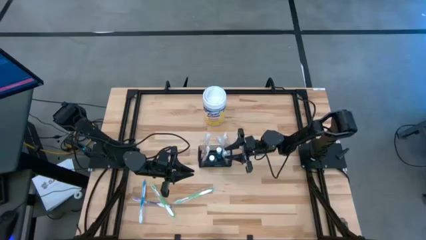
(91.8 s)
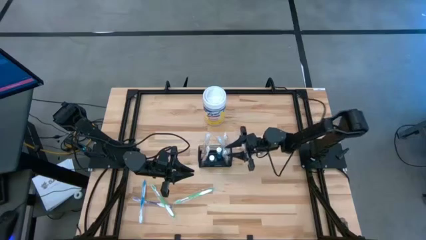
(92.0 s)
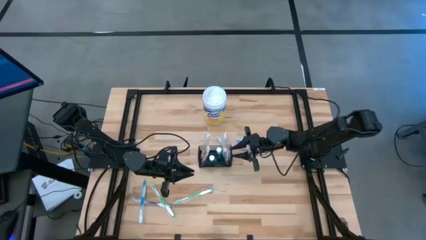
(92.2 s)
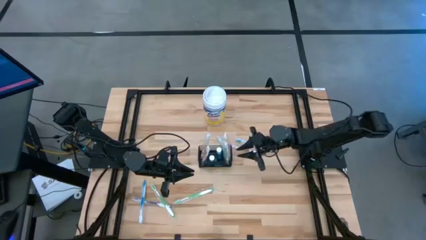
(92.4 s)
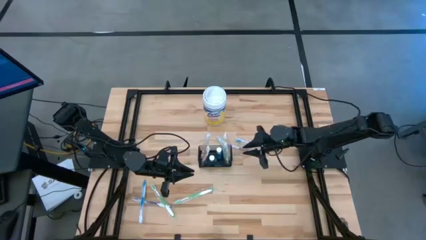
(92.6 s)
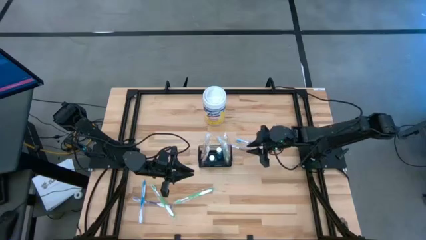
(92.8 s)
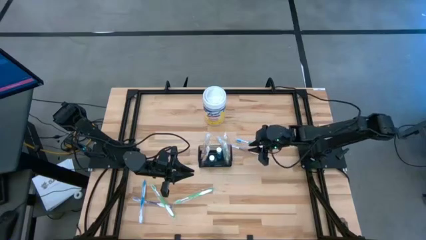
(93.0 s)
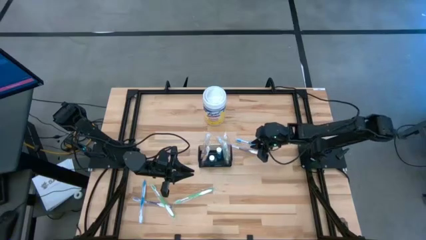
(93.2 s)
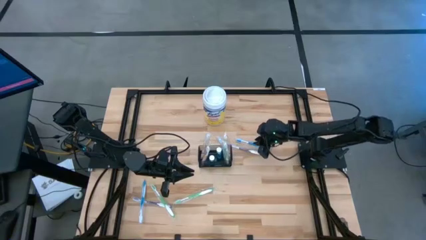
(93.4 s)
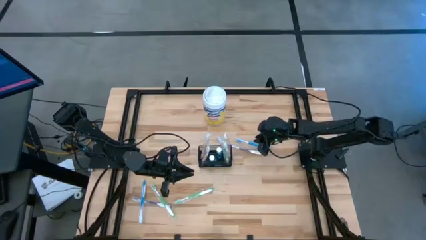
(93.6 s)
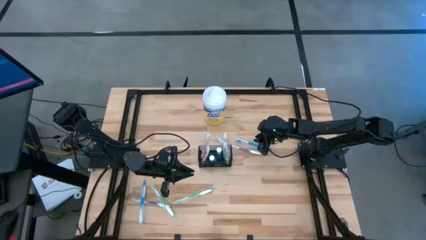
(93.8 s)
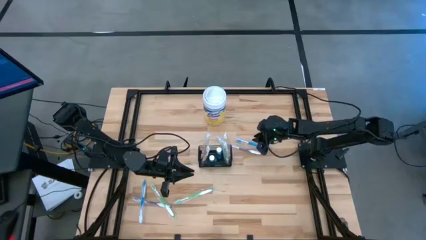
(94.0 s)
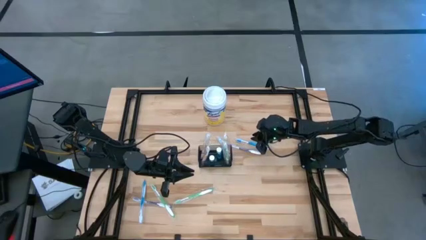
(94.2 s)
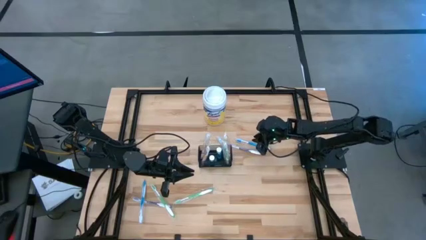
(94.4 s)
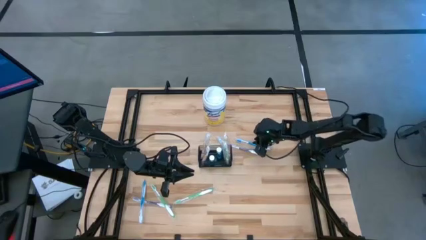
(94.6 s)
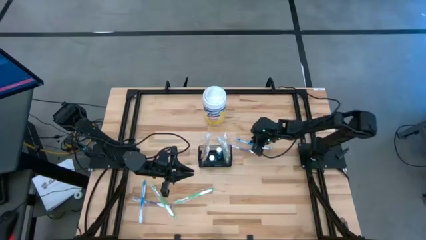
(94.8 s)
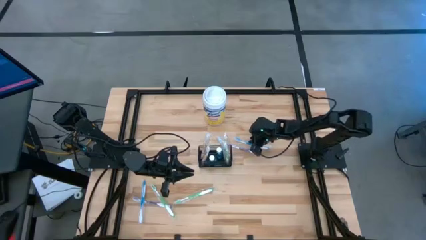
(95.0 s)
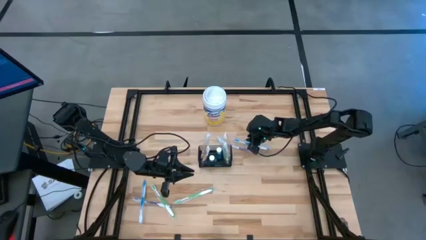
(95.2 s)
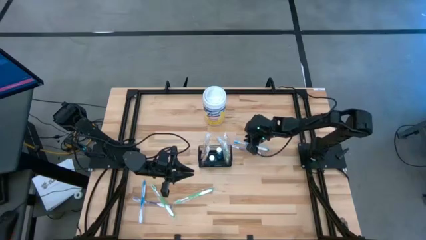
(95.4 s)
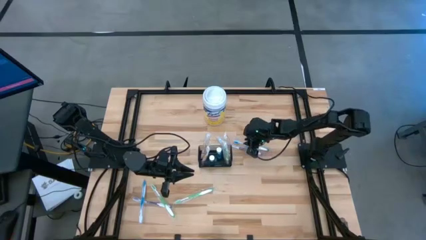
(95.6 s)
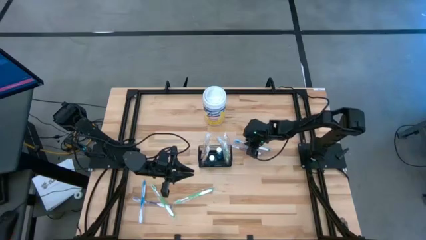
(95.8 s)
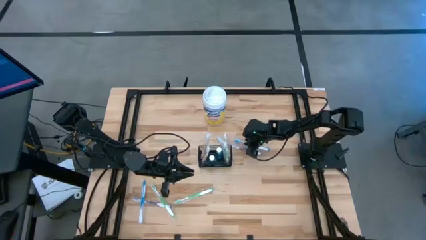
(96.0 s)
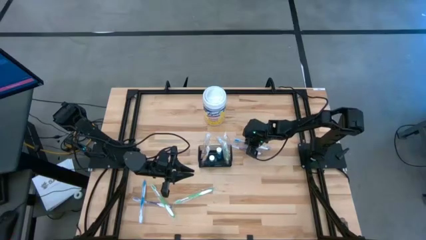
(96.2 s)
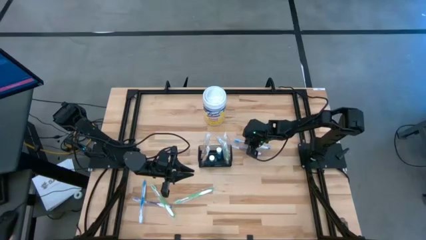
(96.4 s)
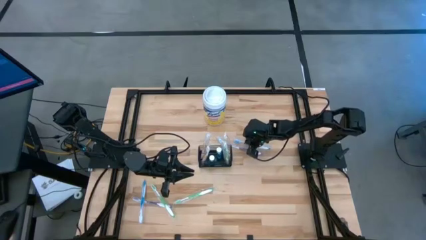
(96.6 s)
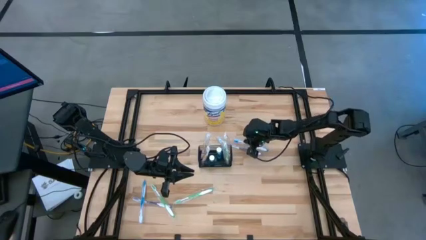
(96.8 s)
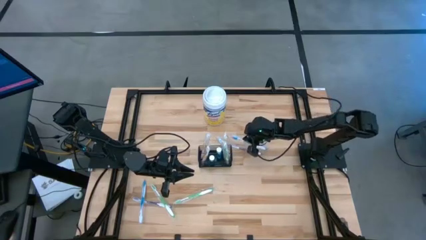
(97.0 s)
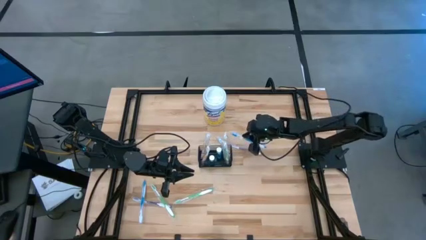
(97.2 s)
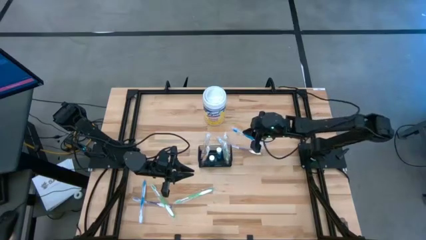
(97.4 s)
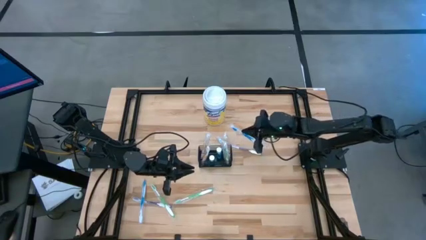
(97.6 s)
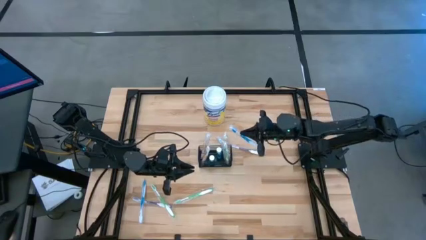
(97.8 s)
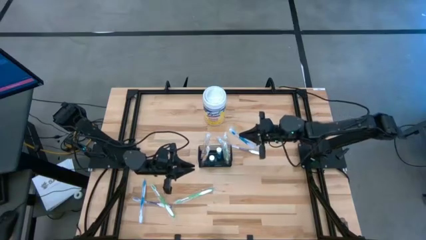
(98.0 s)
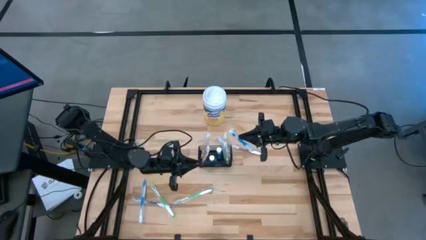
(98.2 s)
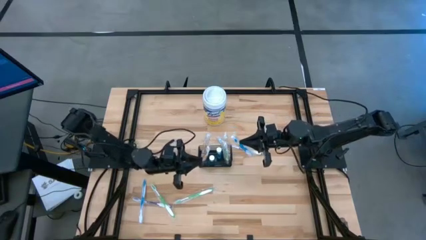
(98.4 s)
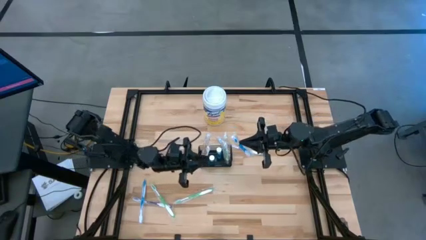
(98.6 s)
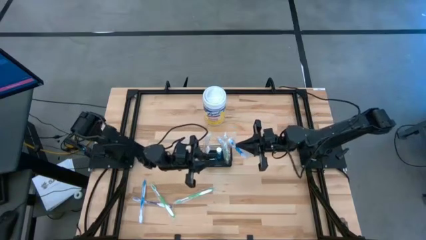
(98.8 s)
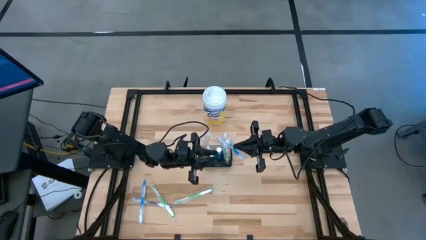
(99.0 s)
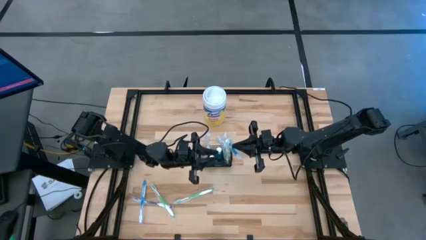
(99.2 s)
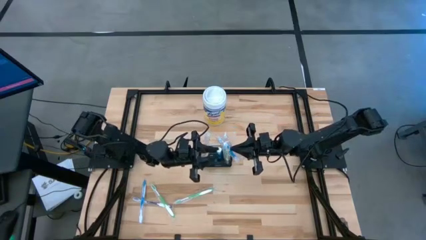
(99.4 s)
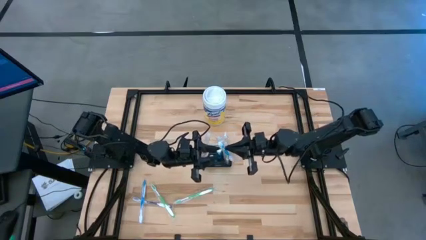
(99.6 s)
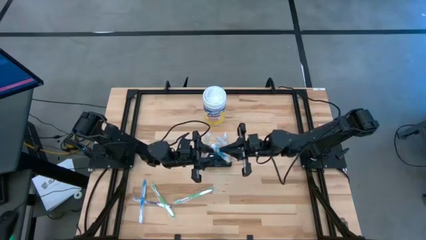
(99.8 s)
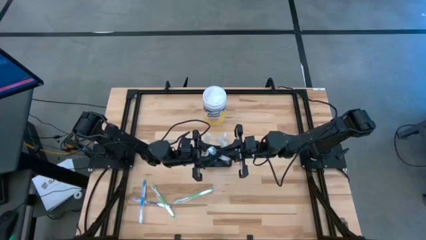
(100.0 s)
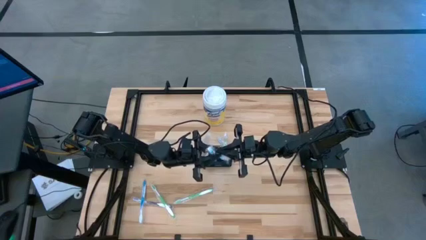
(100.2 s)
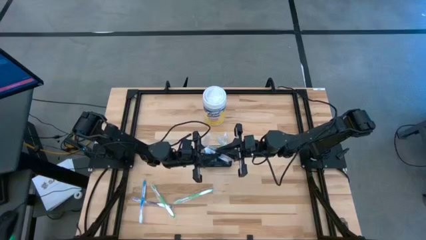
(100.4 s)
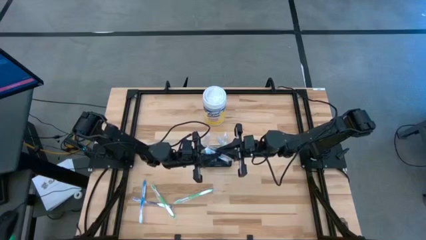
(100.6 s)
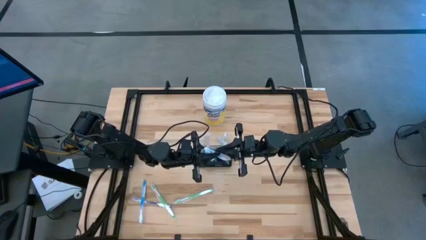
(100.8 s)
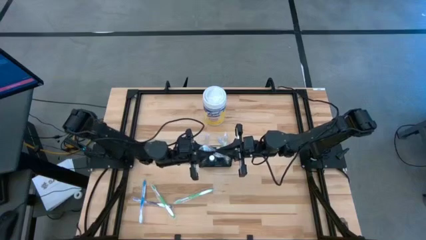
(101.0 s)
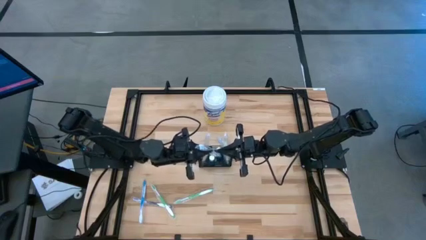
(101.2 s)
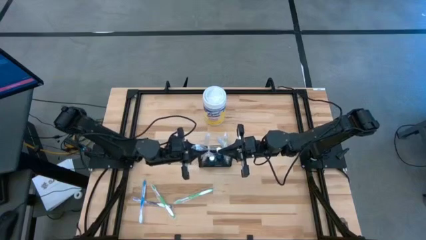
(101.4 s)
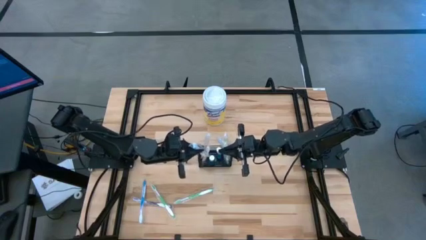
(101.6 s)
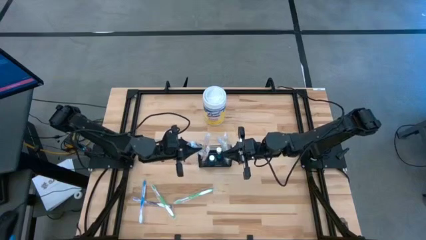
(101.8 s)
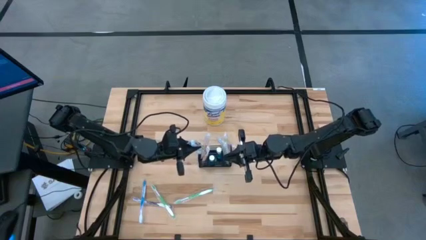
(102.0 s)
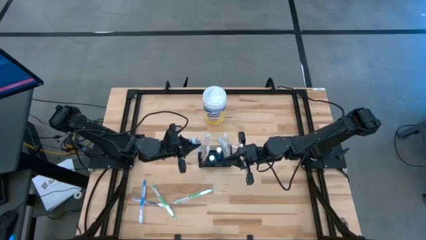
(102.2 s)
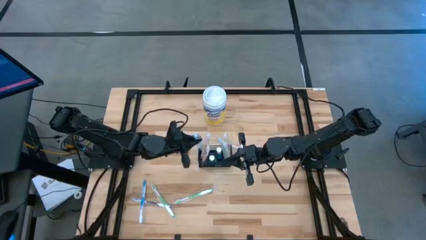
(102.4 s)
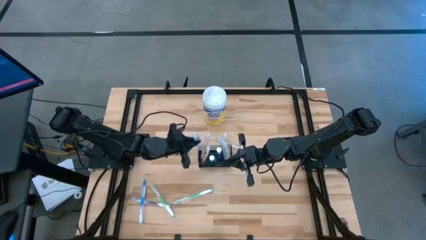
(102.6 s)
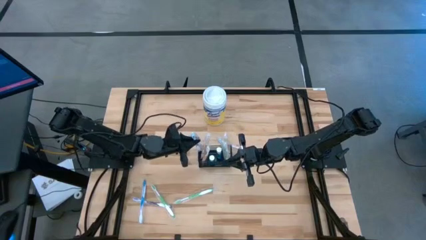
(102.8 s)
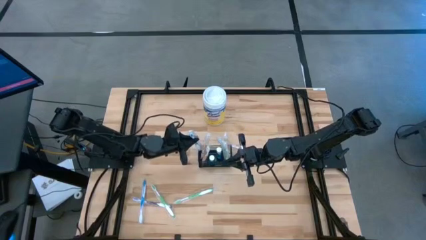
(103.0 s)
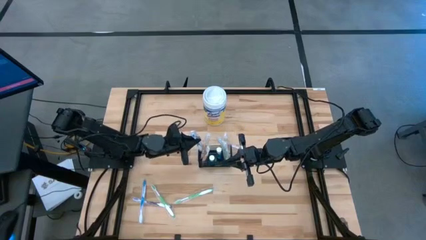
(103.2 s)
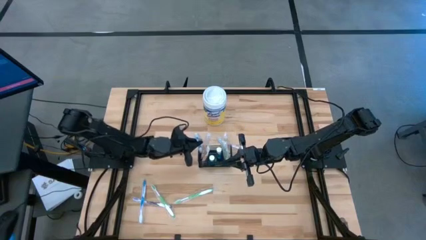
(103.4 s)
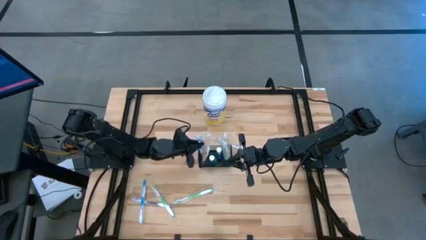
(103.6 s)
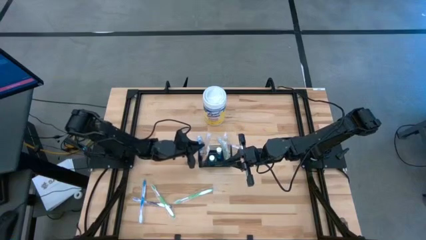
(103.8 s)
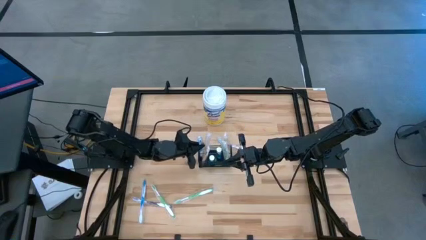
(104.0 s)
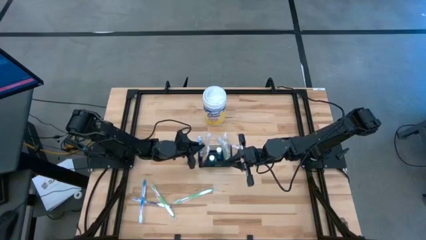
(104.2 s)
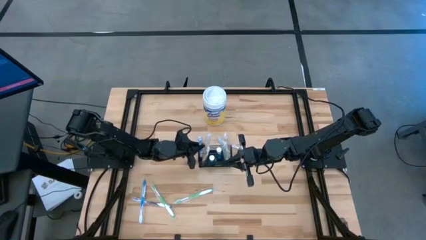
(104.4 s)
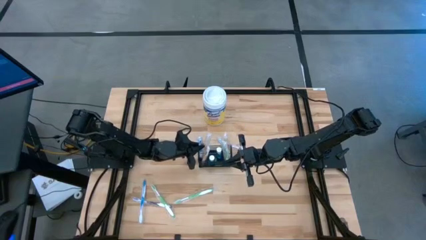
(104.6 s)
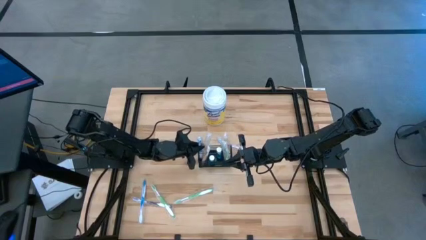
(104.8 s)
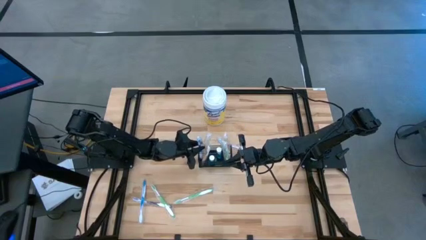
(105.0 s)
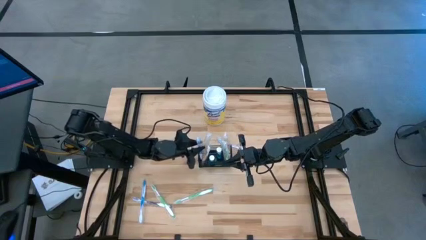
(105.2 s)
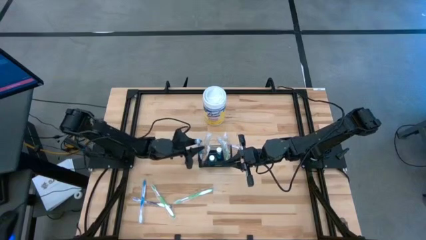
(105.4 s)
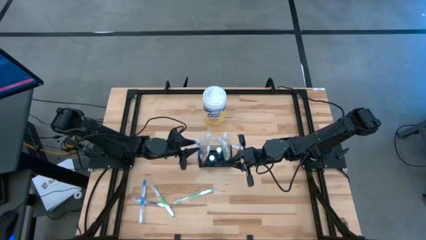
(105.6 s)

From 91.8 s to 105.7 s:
Task: Pick & Place toothbrushing station
Put the top blue toothbrush into the mesh organizer

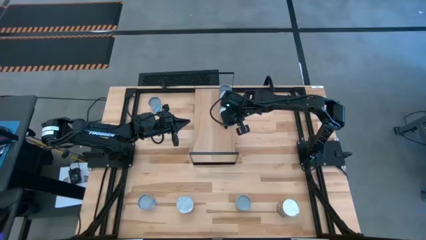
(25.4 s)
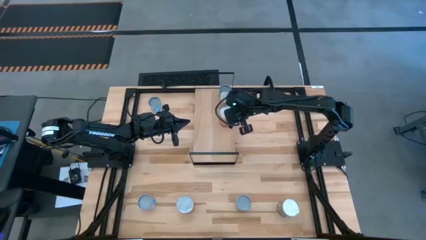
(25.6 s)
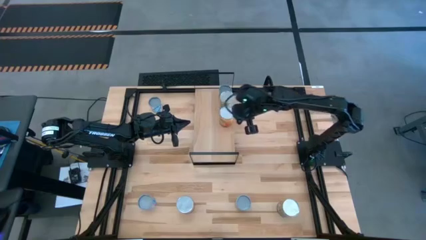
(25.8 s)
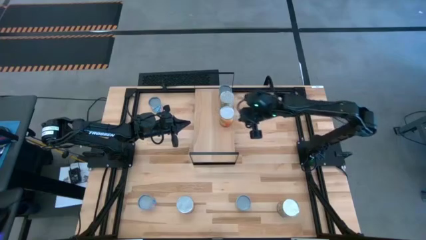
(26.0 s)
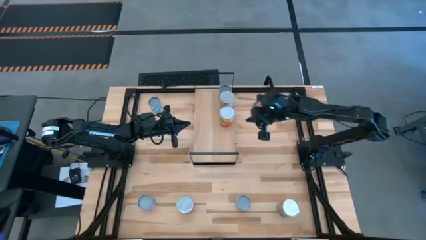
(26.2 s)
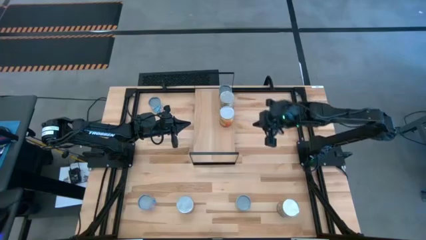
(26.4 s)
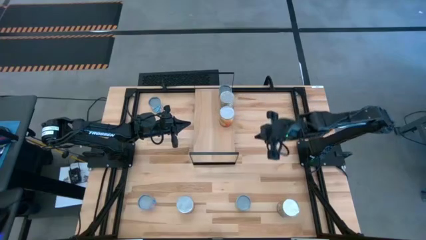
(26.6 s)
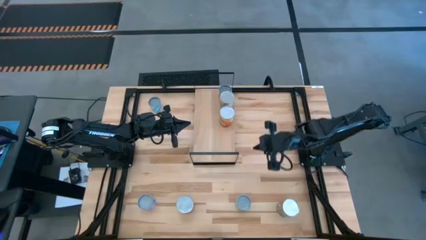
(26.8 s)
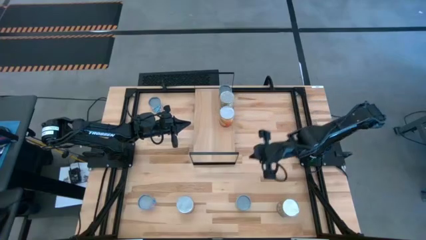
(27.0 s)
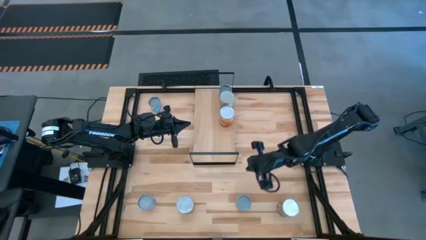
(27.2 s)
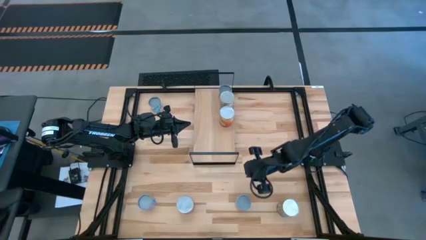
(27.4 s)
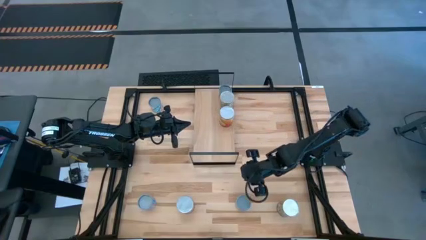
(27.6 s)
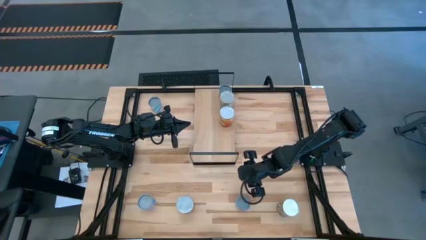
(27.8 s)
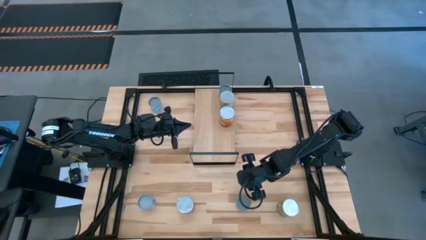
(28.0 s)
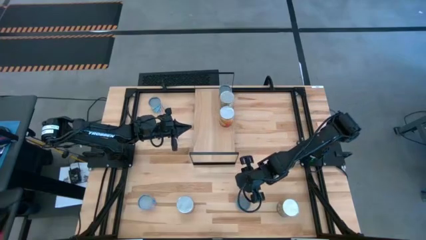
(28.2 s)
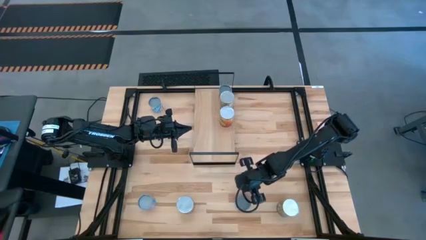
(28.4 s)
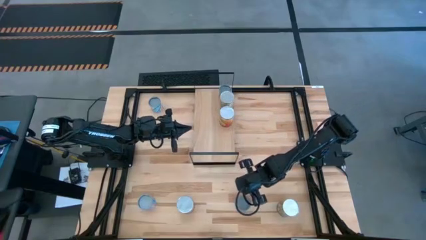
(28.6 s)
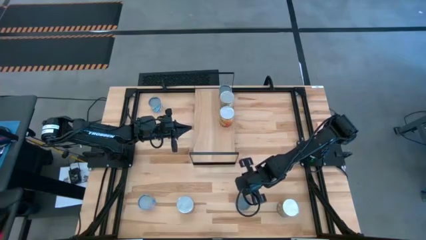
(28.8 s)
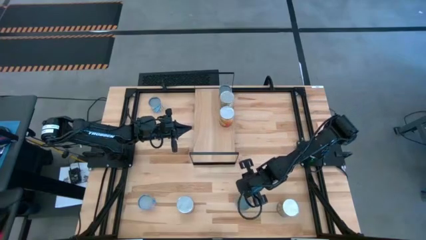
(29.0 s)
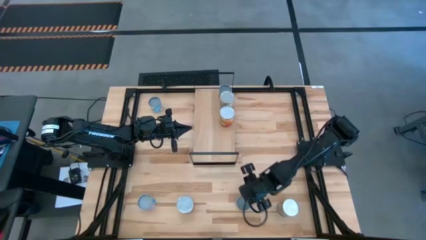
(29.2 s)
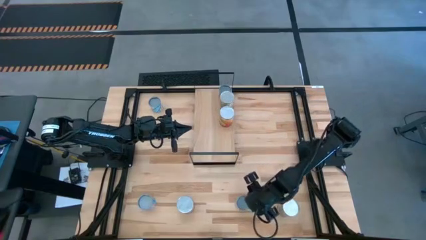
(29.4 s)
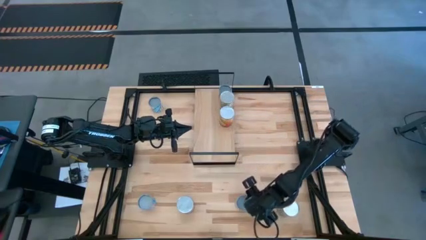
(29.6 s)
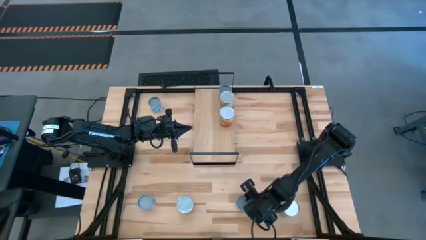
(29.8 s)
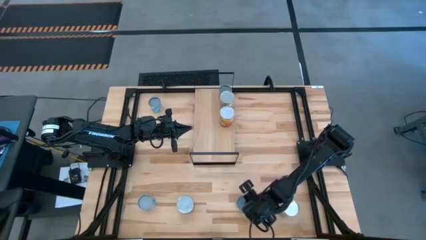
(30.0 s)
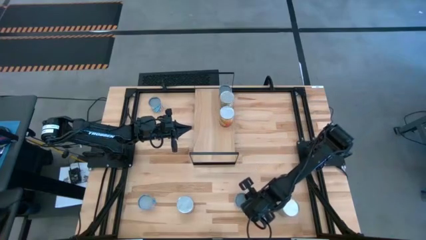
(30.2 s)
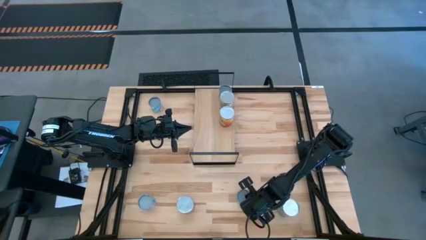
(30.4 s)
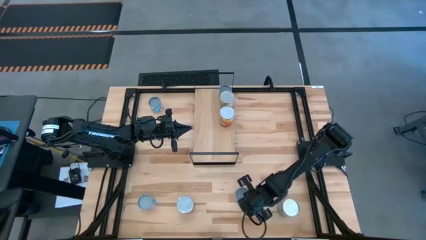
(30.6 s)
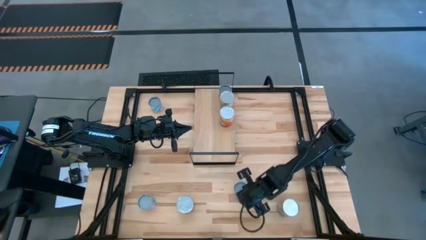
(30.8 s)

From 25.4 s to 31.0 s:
Task: Pick and place cans onto a shelf
Put the small green can on the shelf
